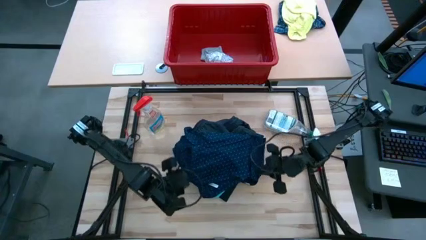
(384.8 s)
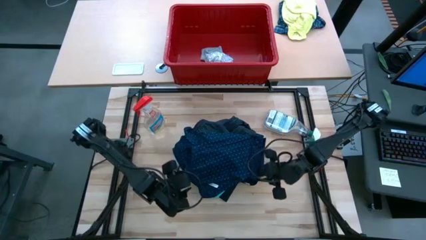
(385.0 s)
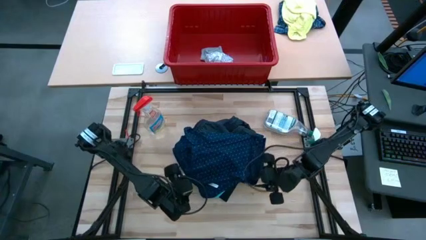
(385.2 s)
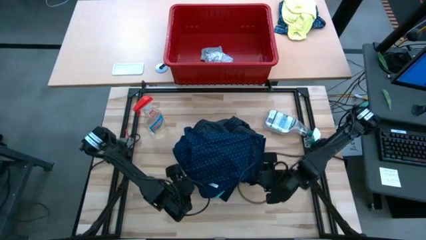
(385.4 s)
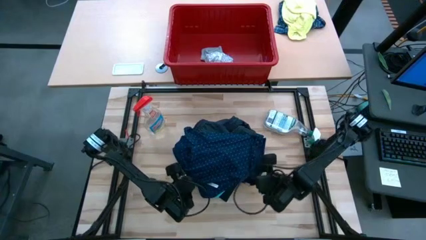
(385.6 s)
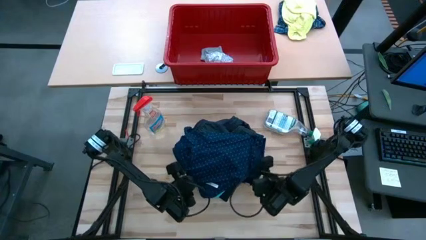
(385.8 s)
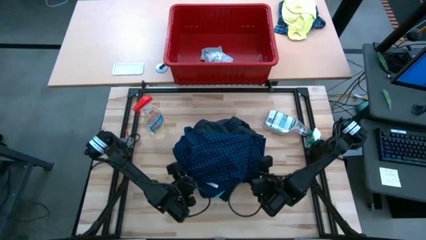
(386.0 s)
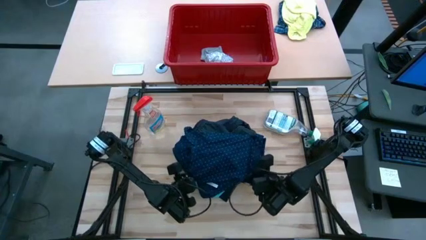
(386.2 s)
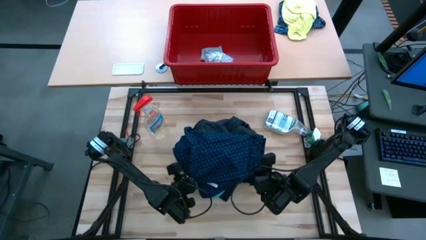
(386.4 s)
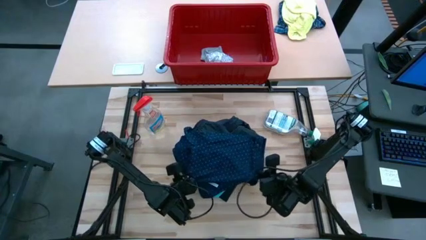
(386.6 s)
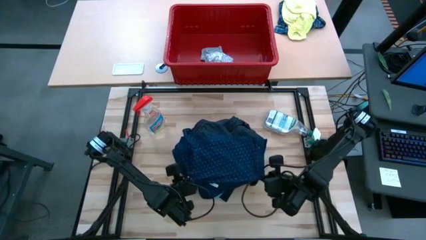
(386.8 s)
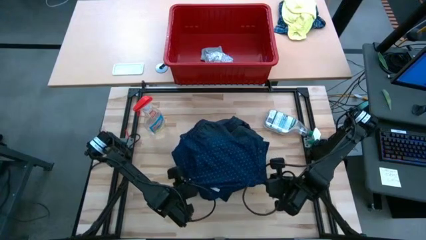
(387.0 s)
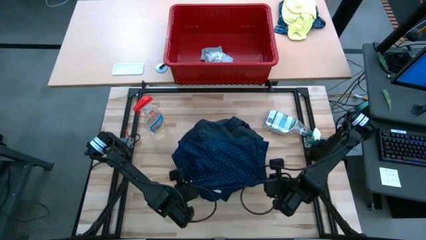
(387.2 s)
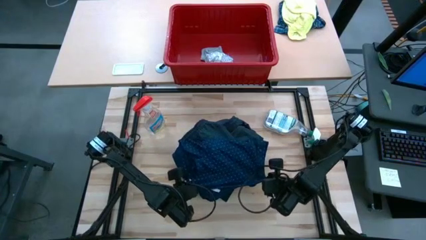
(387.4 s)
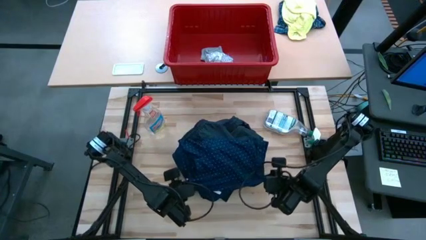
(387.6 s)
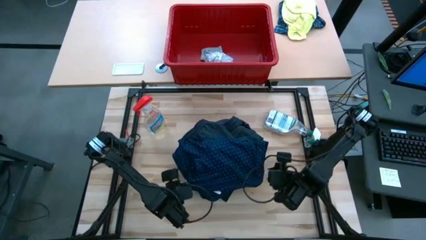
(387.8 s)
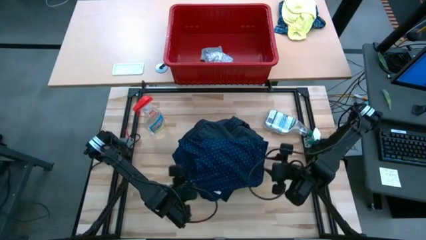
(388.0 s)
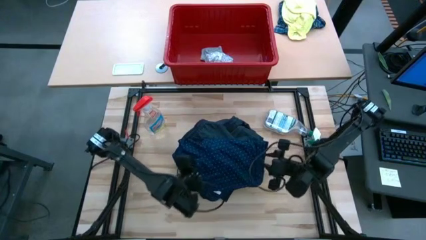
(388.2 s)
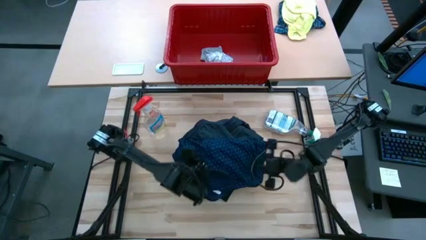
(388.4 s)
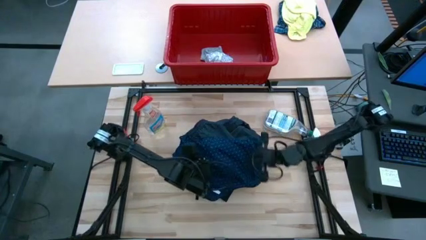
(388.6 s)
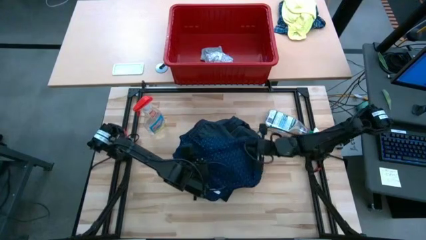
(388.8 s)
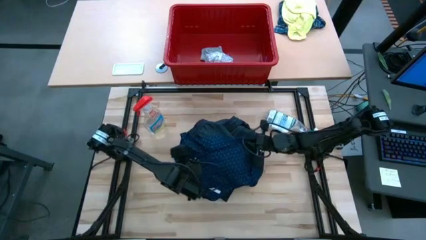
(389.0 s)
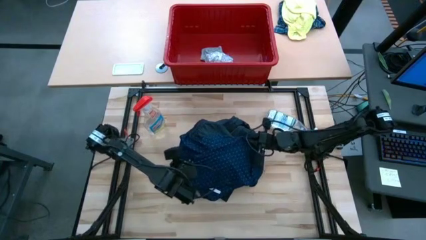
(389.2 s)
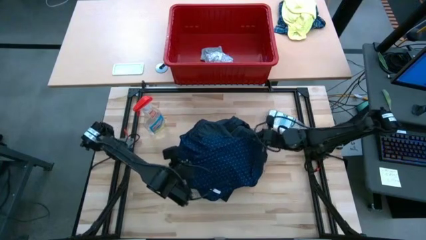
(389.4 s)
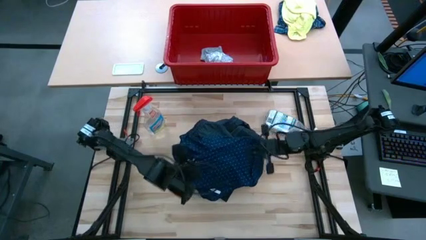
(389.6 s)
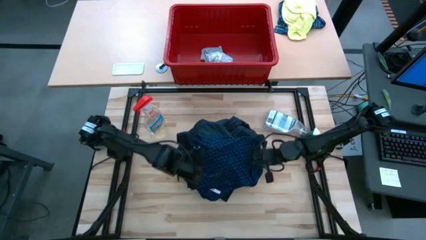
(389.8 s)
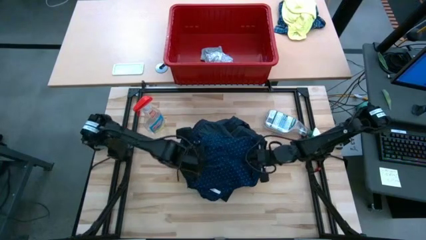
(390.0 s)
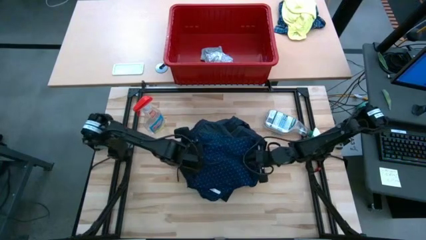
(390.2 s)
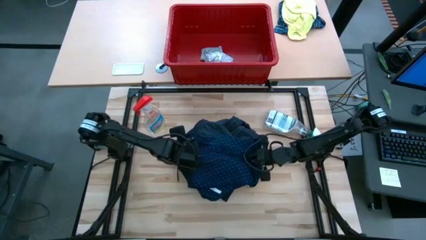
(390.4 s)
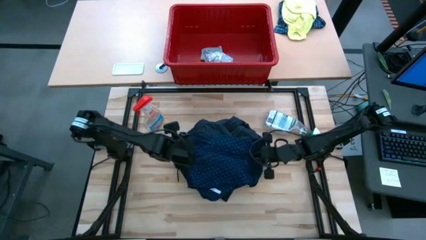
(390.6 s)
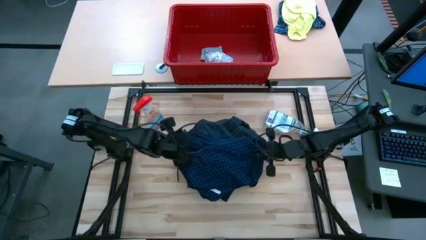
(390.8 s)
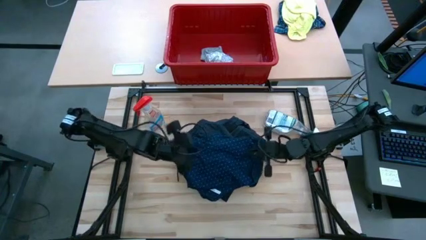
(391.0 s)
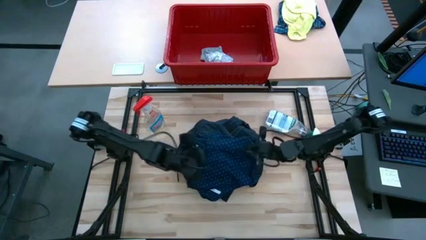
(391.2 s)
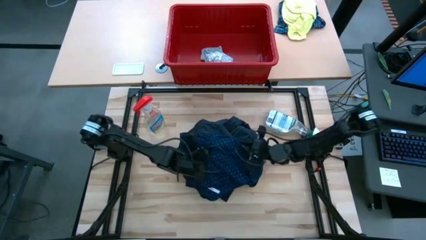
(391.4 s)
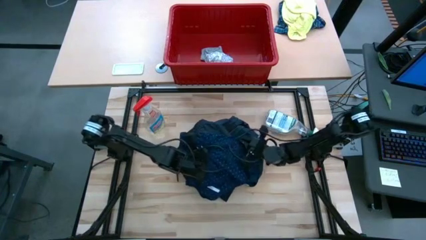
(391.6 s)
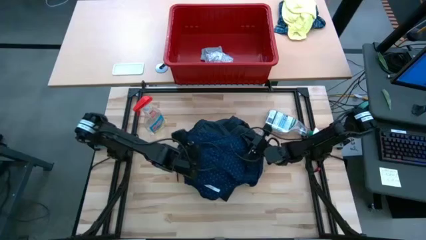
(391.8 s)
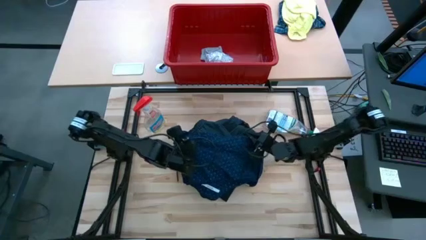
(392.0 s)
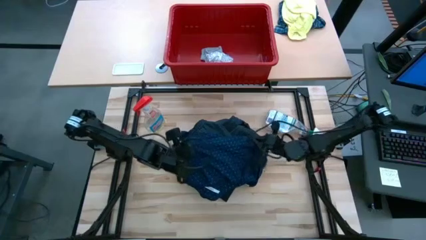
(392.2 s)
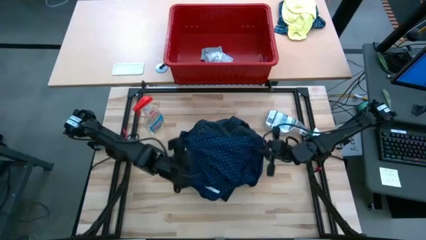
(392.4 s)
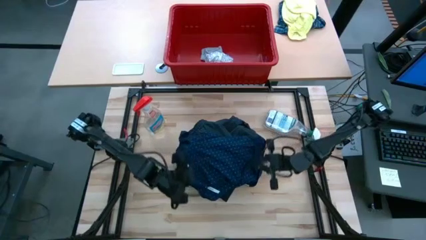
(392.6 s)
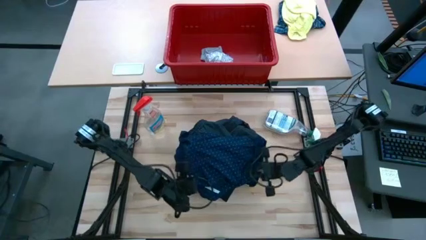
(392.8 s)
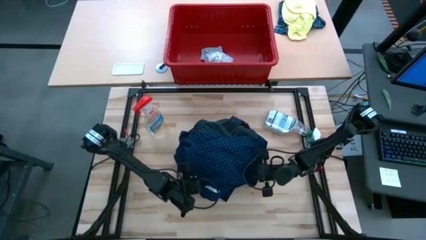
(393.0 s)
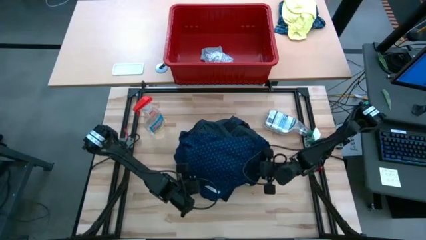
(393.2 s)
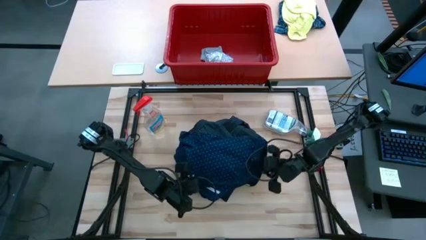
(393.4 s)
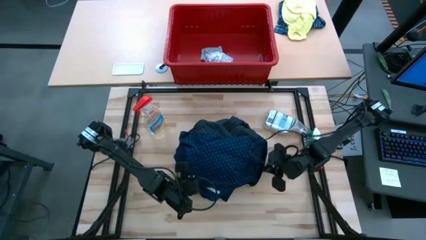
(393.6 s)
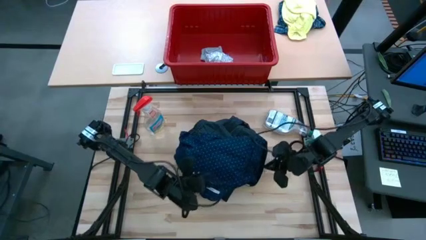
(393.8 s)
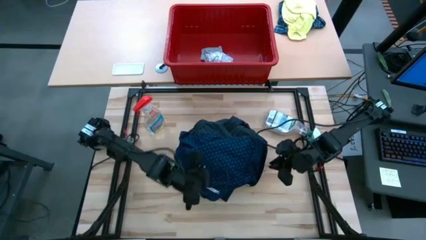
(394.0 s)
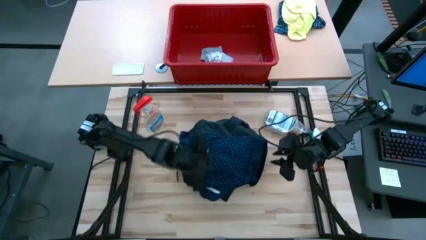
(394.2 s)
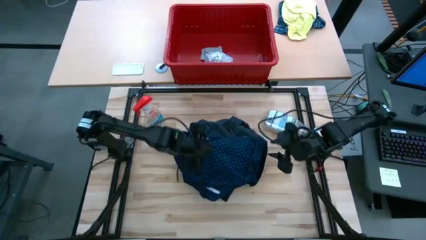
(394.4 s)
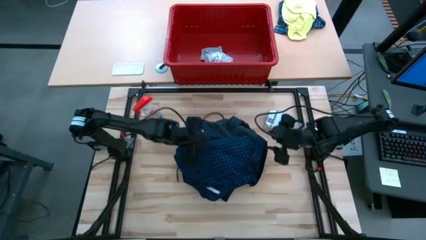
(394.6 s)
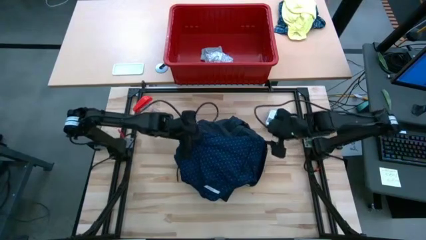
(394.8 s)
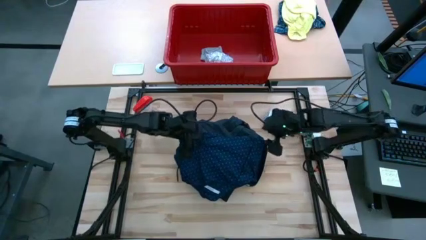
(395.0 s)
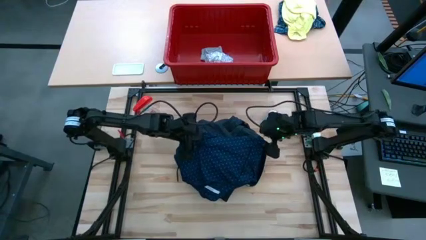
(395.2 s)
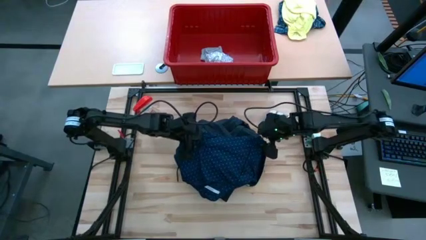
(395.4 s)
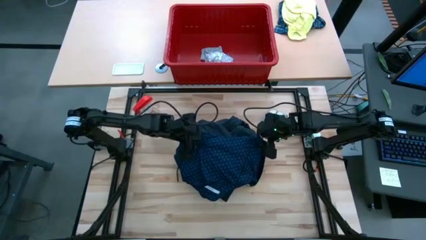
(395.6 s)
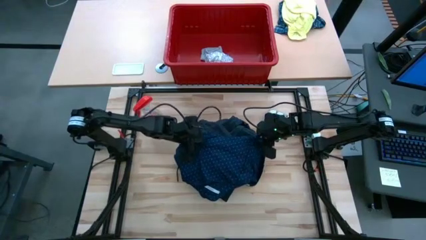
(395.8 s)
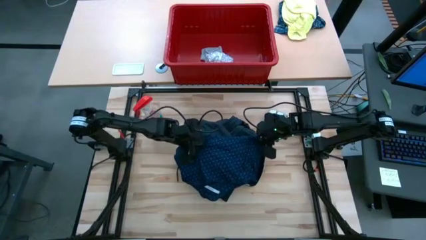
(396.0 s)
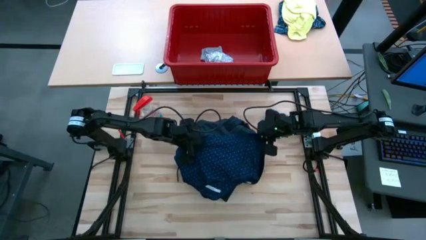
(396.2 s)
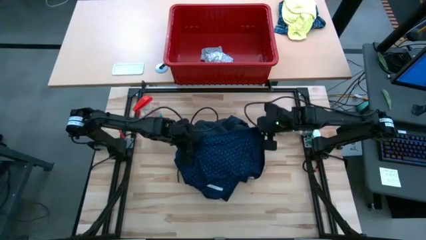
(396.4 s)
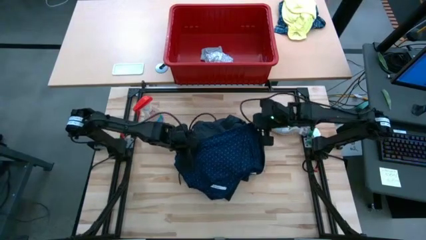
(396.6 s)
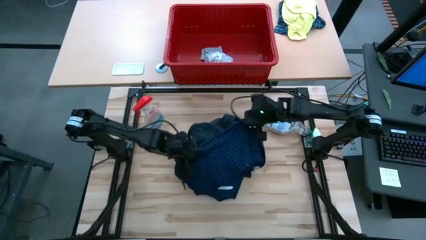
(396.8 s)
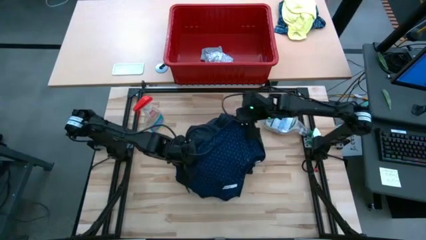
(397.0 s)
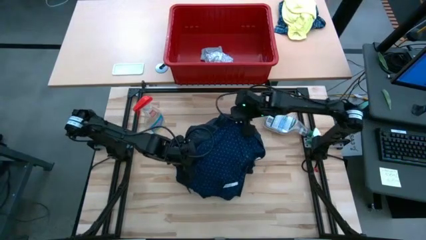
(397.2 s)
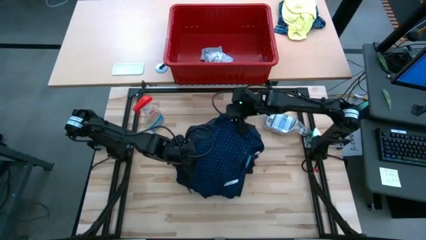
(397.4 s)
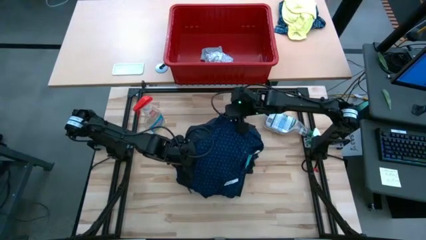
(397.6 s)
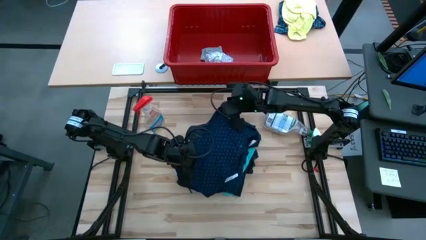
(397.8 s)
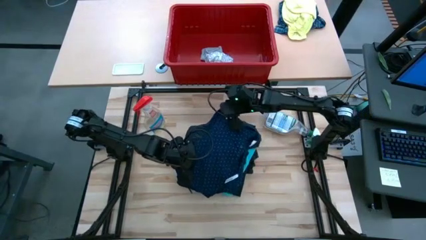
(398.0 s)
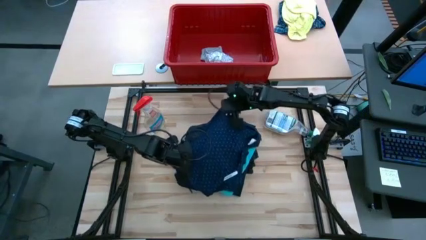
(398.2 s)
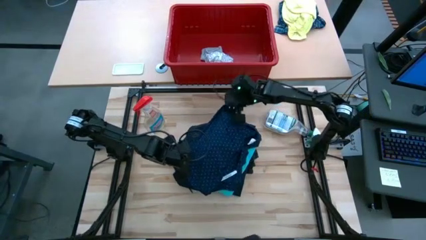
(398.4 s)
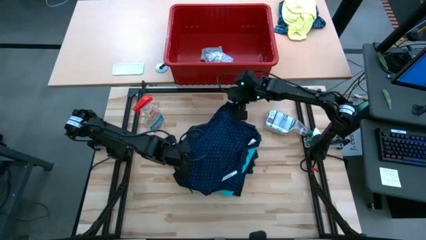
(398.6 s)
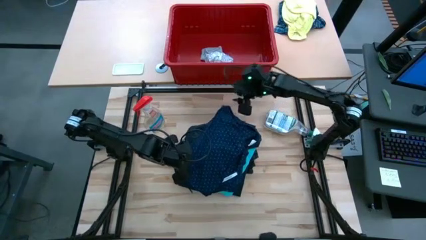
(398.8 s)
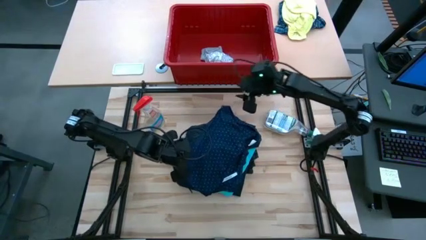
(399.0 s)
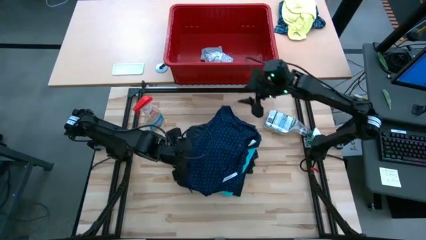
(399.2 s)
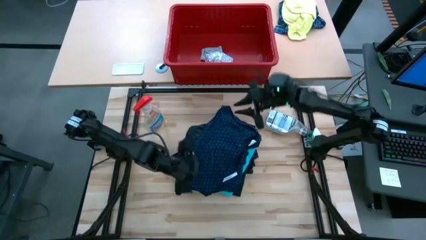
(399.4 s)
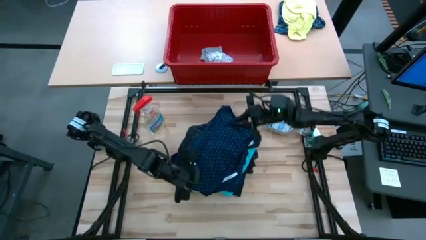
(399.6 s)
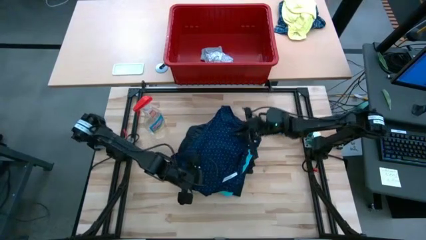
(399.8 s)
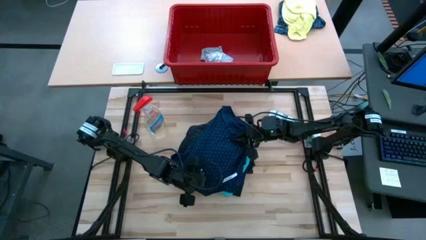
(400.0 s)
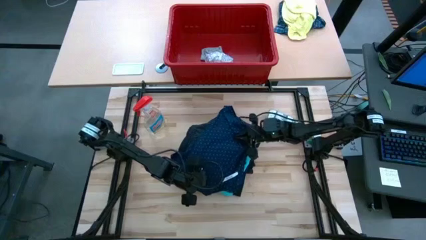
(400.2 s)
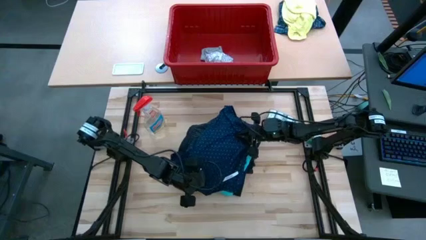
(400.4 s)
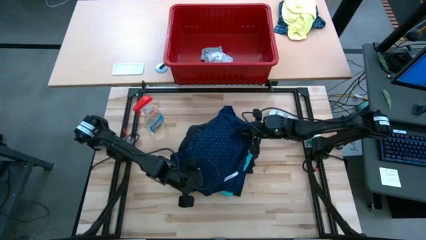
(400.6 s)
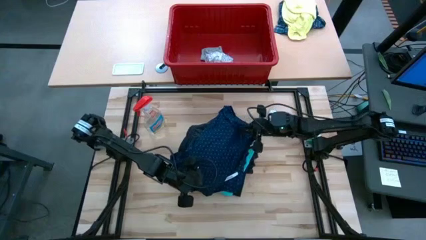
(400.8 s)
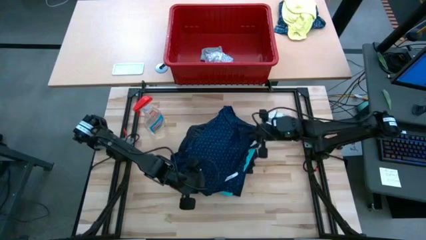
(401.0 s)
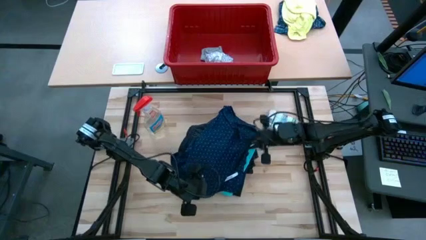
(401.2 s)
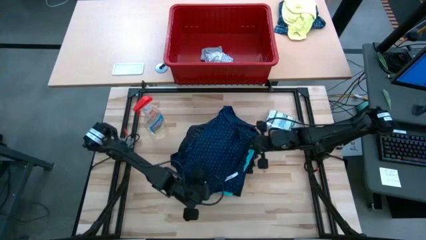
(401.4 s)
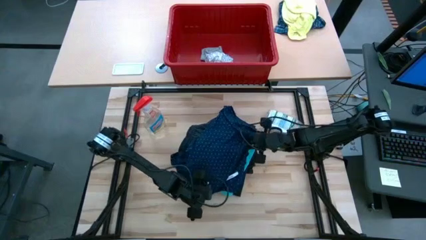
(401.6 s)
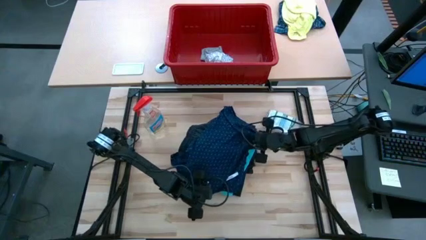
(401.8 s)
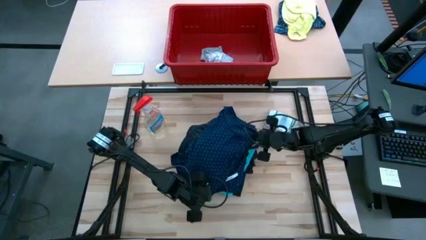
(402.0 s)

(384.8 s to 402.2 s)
Task: Fold Laundry from Bin
Fold the blue polo shirt
